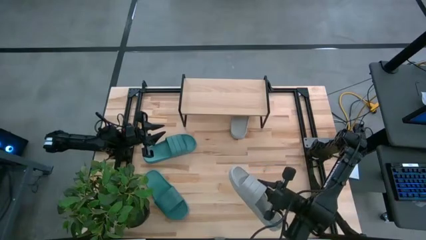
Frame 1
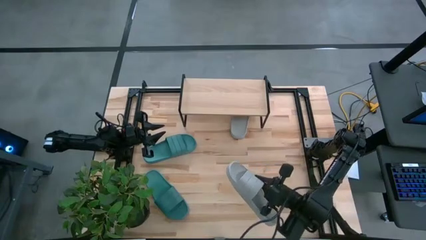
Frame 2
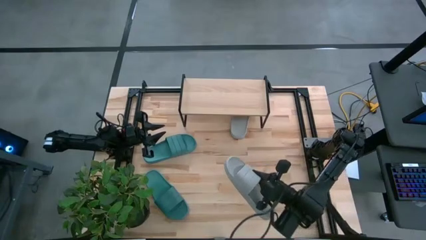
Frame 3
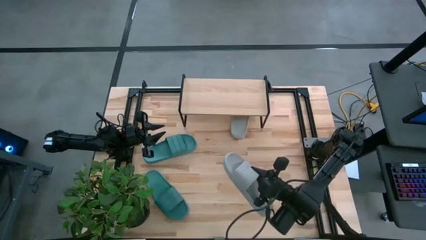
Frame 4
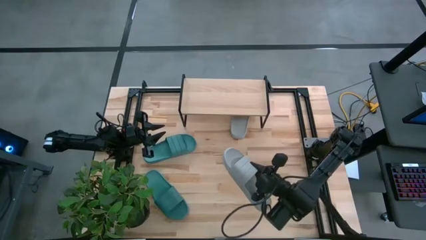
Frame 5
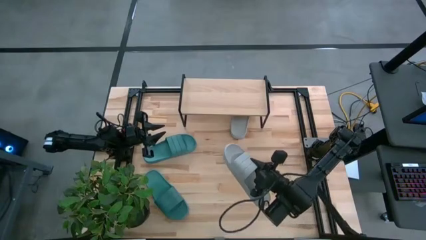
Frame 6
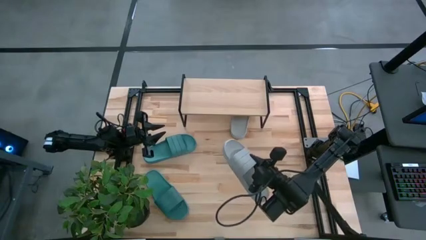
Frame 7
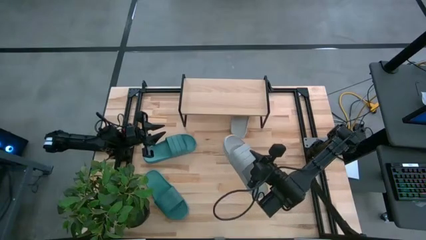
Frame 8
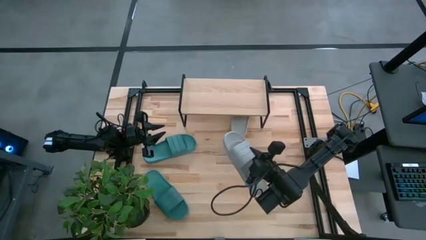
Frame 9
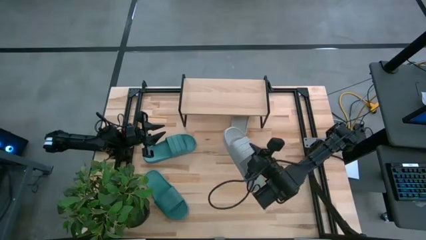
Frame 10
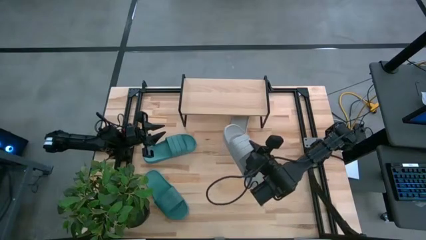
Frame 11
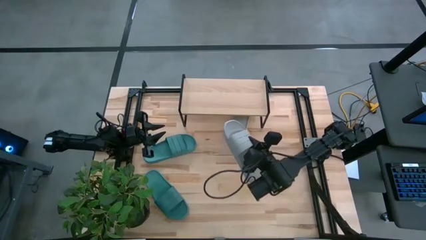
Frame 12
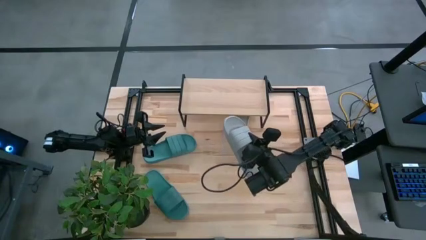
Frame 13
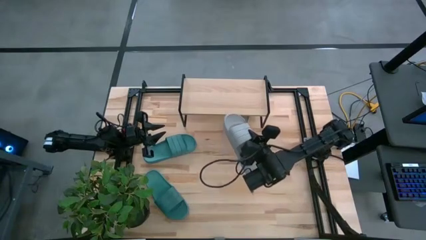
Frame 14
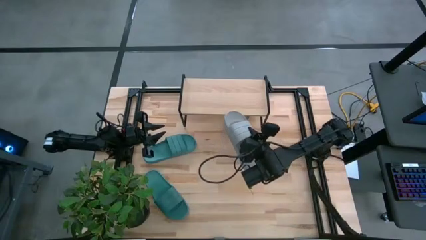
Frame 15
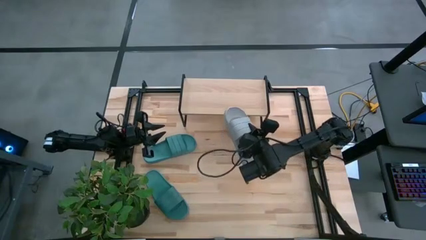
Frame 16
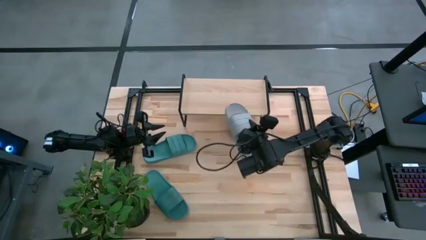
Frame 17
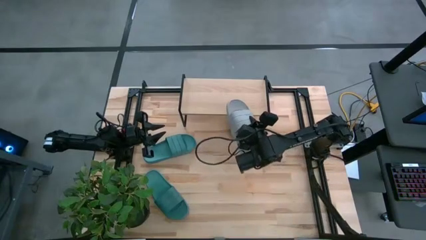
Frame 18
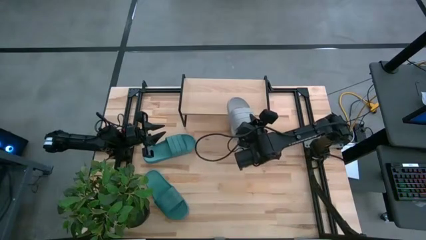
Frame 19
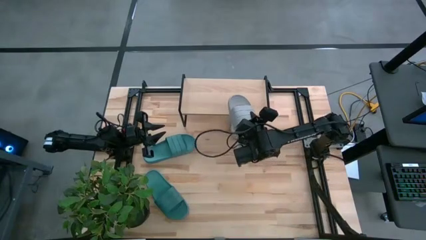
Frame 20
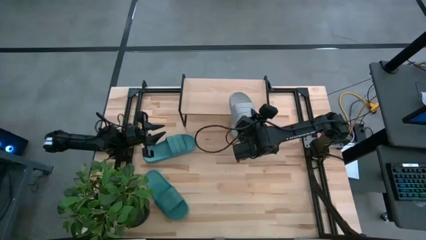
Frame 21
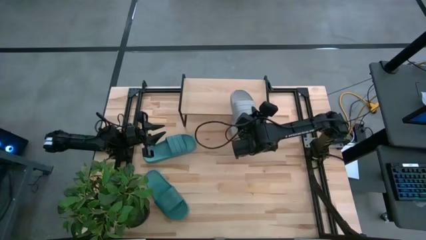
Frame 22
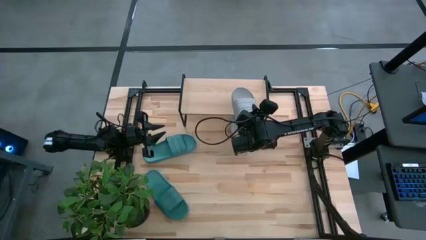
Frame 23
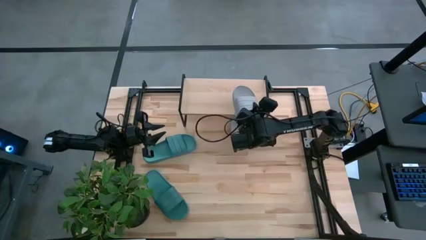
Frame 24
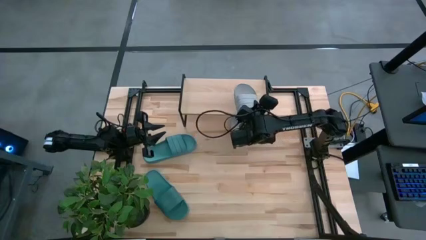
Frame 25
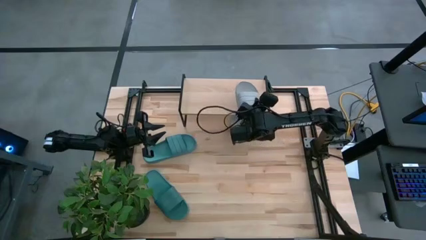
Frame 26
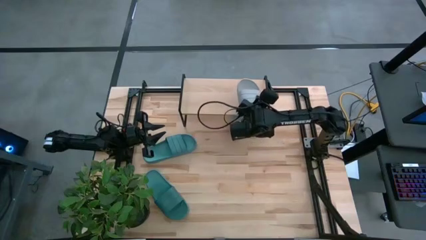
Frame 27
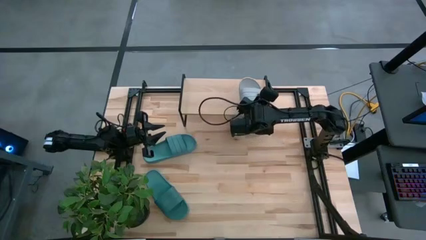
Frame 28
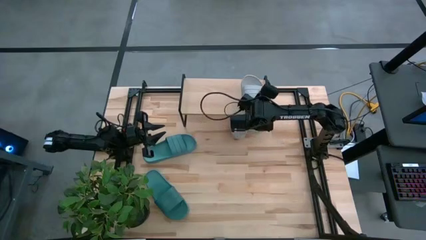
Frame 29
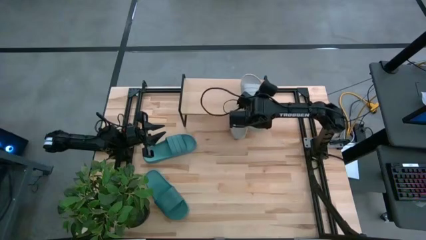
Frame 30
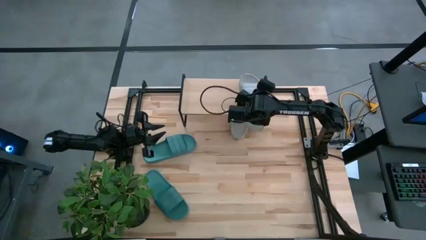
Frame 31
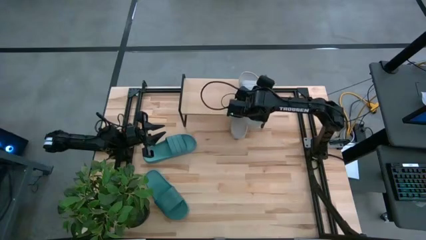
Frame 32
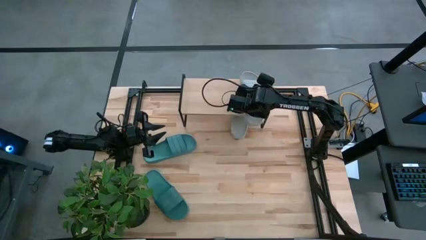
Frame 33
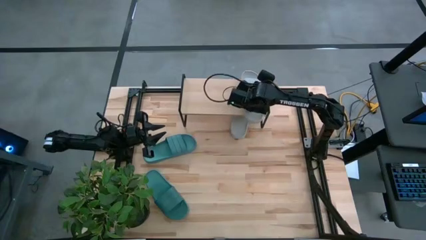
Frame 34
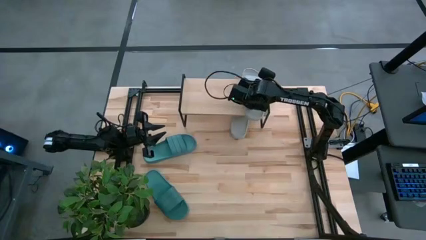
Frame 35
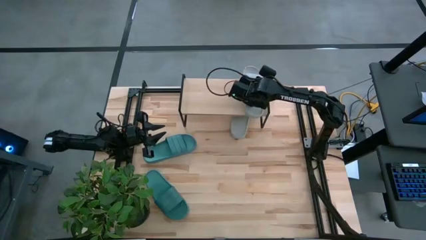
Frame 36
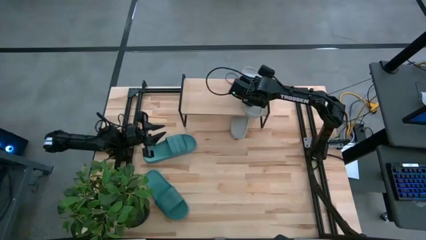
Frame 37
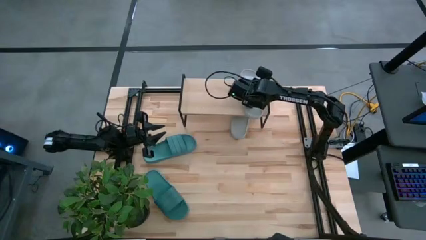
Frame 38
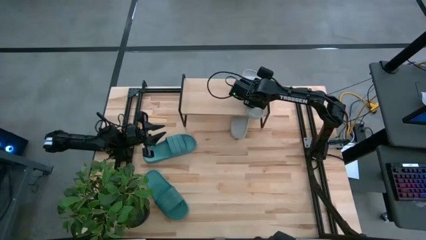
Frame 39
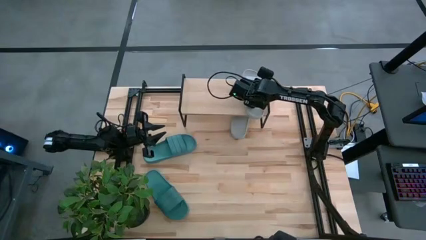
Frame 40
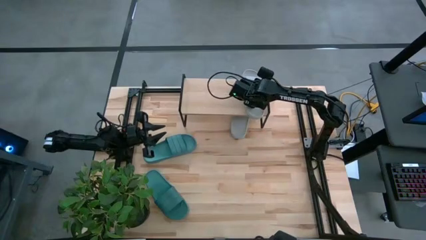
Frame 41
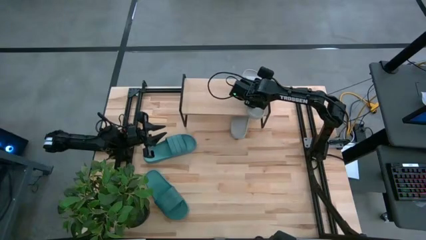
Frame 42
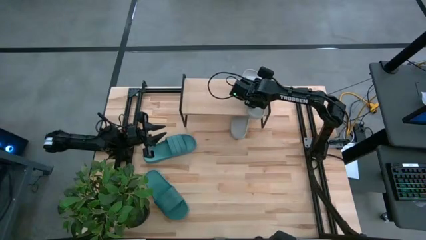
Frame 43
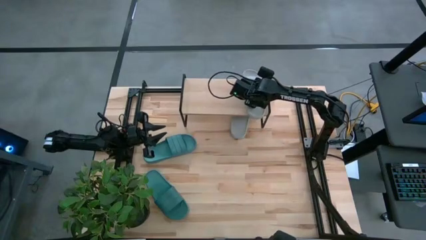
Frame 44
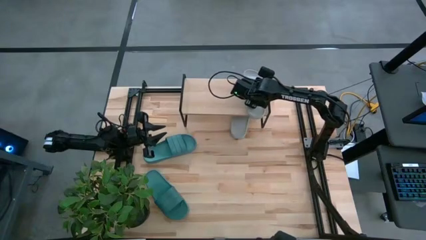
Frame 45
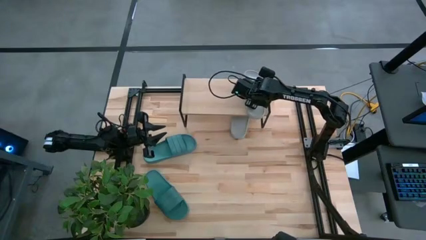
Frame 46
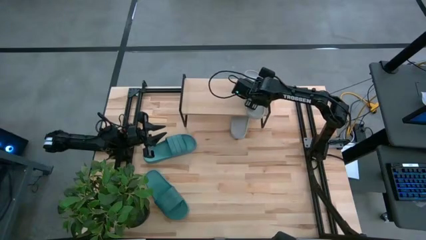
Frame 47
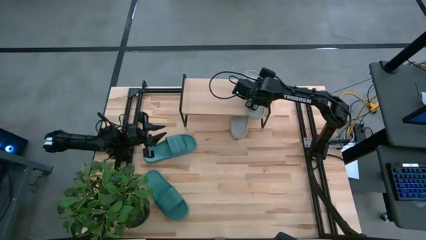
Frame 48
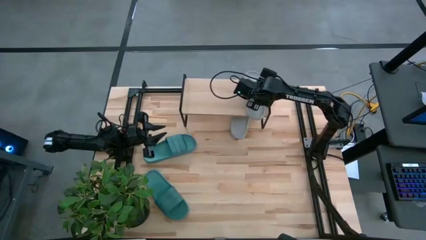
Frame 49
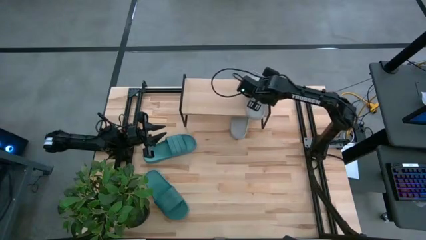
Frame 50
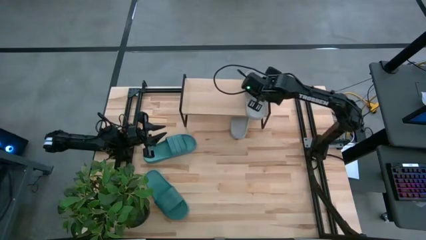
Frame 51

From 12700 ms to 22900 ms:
Task: Pick and place slides into the shelf
Put the bottom gray slipper on the shelf

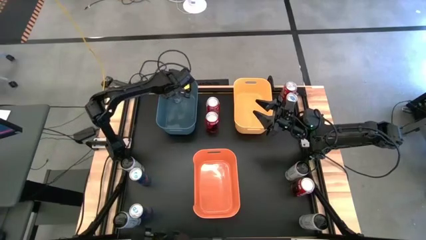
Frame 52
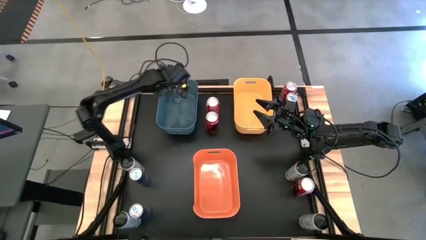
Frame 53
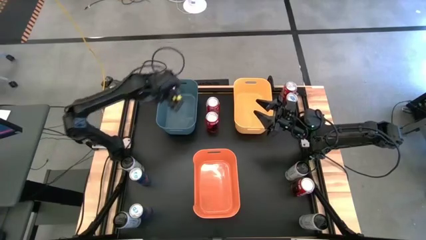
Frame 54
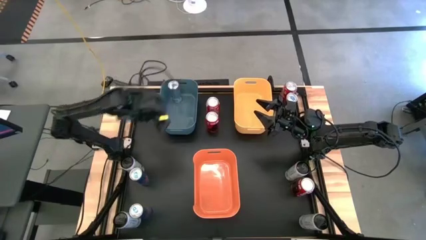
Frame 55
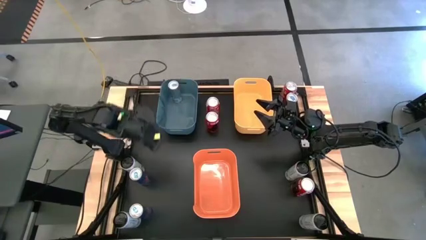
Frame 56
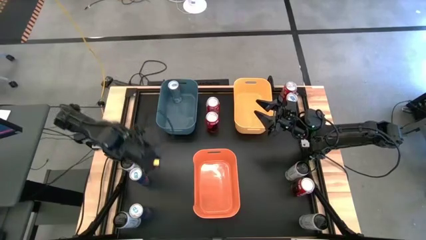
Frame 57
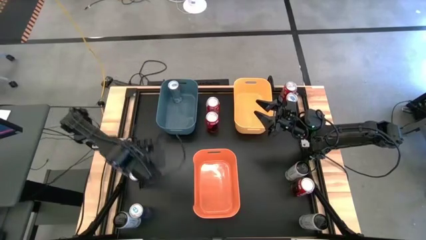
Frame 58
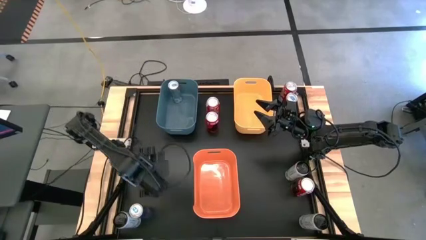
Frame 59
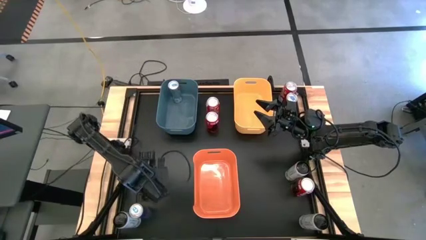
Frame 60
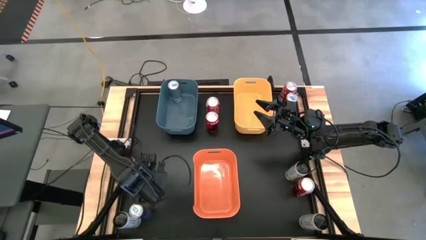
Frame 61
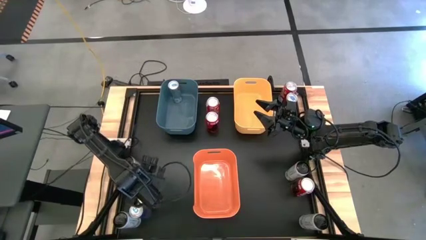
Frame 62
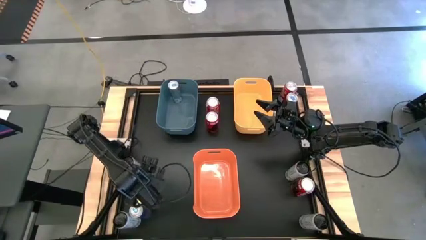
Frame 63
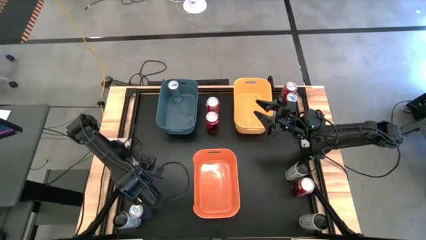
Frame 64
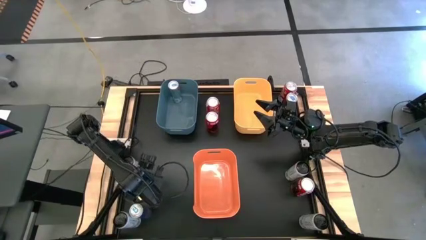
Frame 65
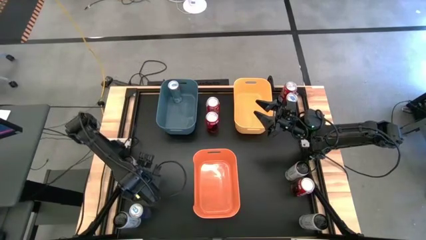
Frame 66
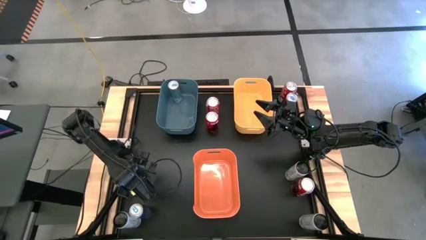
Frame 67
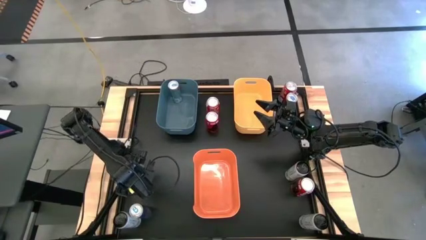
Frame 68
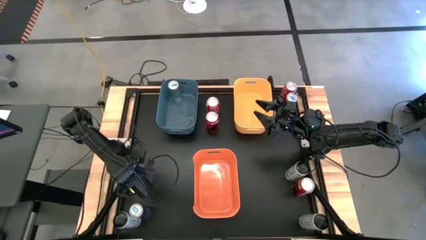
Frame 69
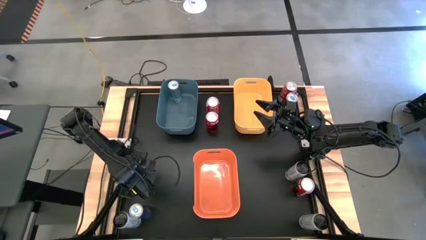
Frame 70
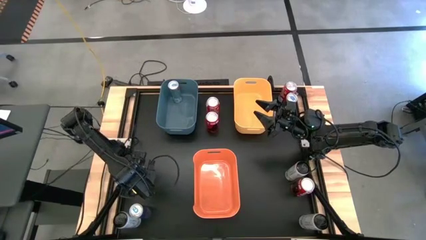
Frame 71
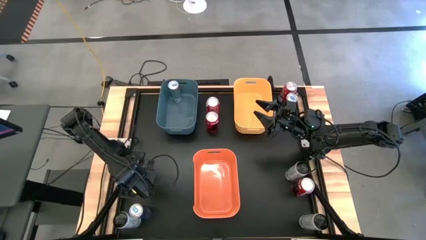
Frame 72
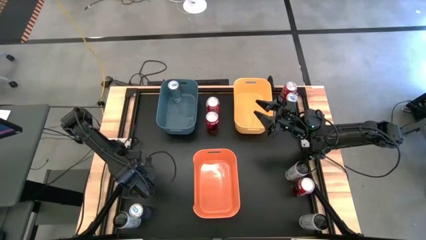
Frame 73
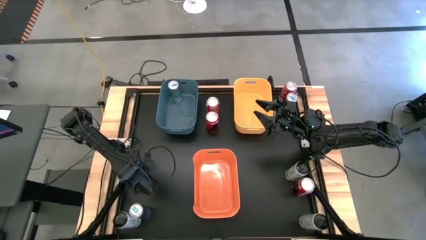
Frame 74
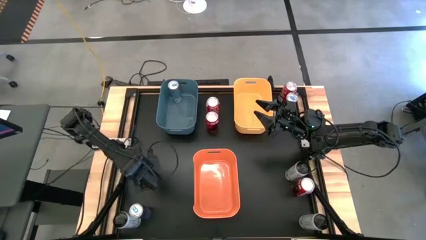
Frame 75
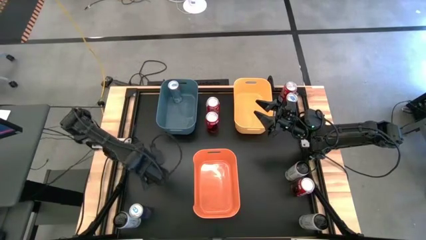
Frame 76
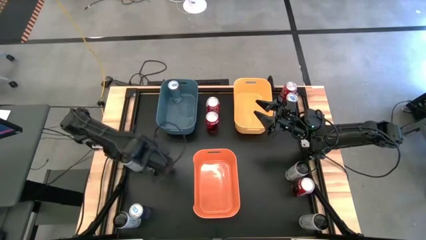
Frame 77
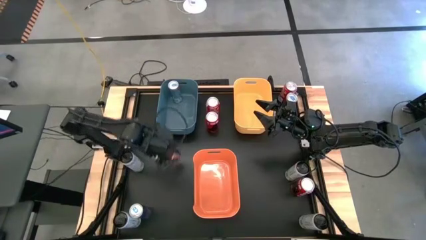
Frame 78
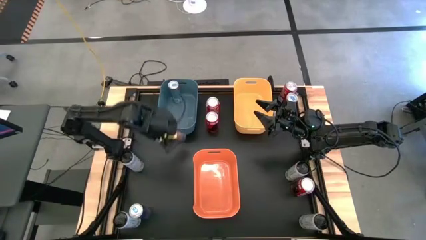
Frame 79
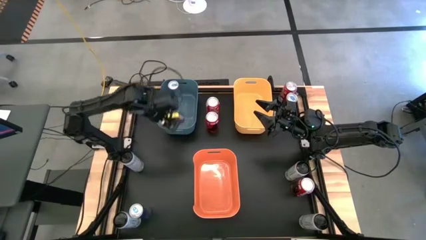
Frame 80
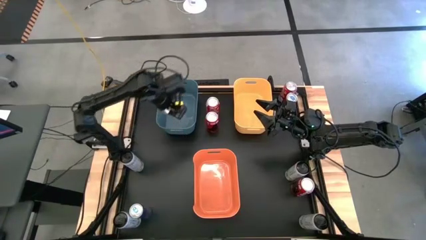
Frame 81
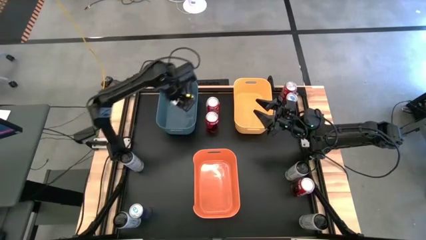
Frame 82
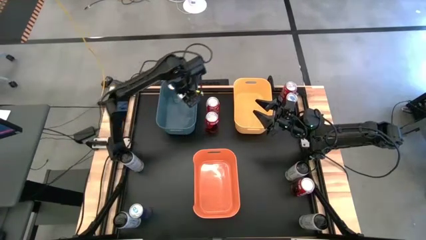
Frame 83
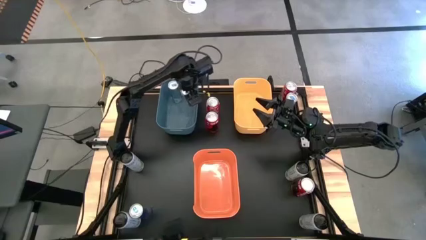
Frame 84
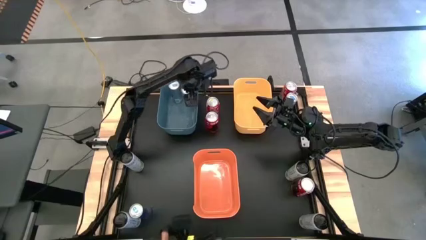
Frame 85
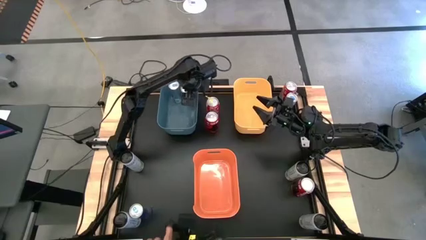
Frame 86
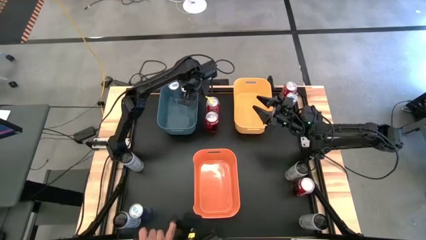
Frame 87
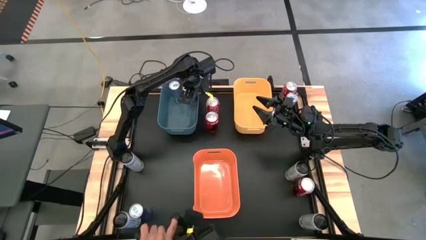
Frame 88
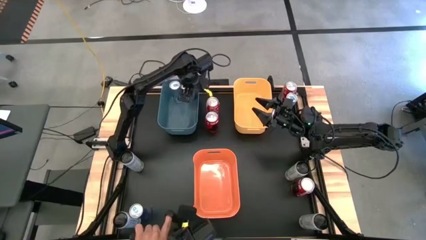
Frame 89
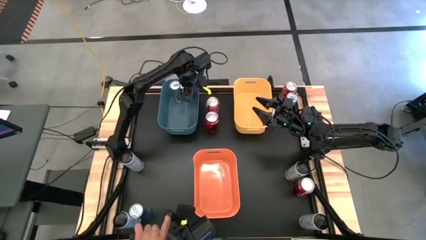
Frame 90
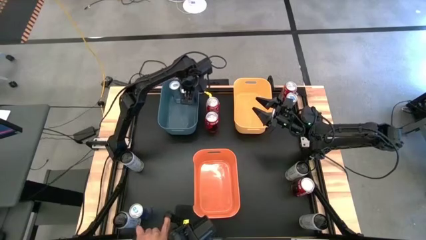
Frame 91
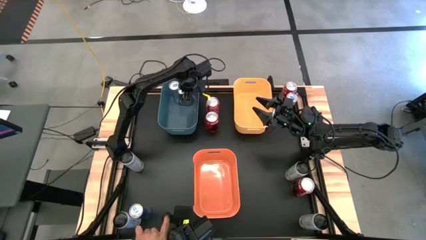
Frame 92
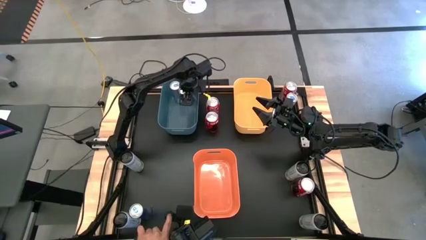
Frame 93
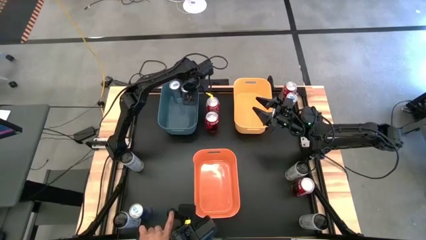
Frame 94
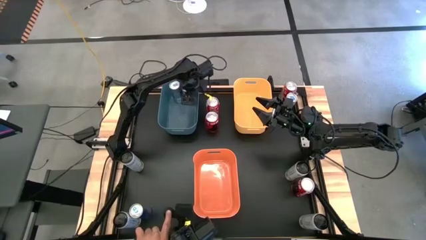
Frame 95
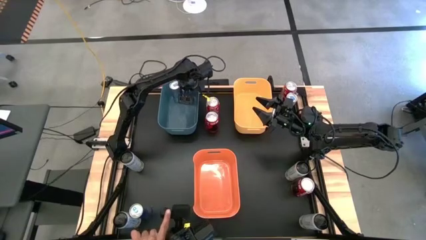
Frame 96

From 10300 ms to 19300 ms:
Task: Sort soda cans
Put the middle left blue soda can into the blue bin
